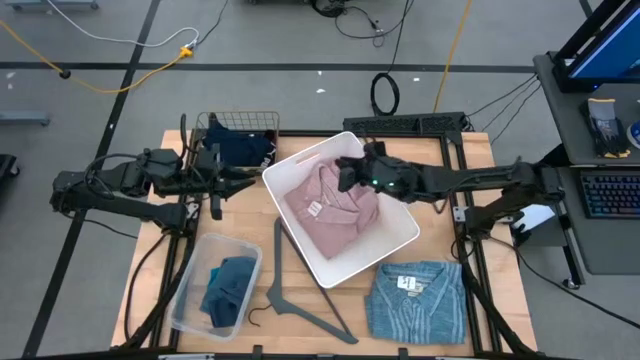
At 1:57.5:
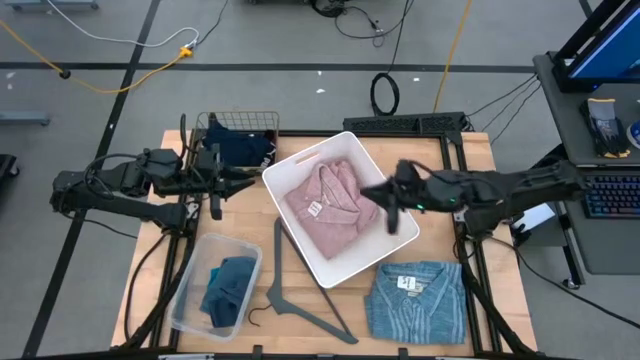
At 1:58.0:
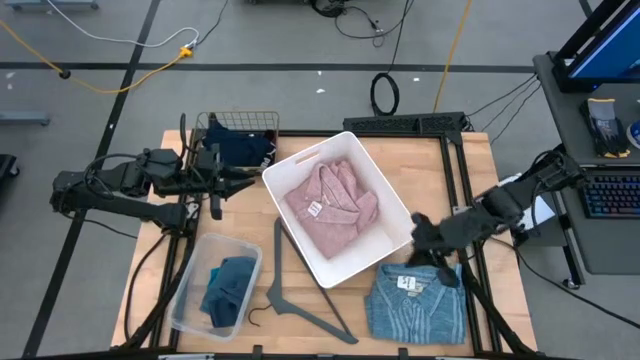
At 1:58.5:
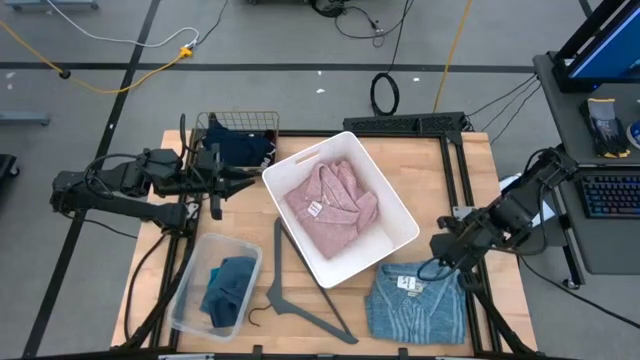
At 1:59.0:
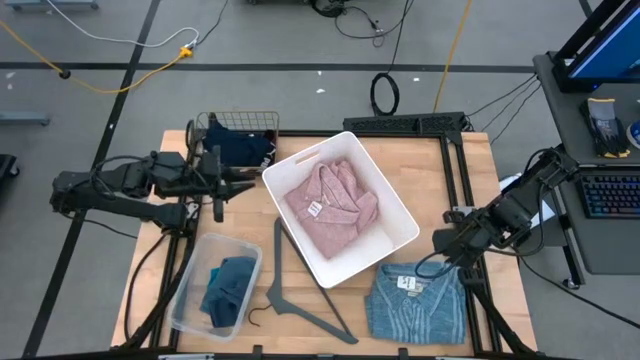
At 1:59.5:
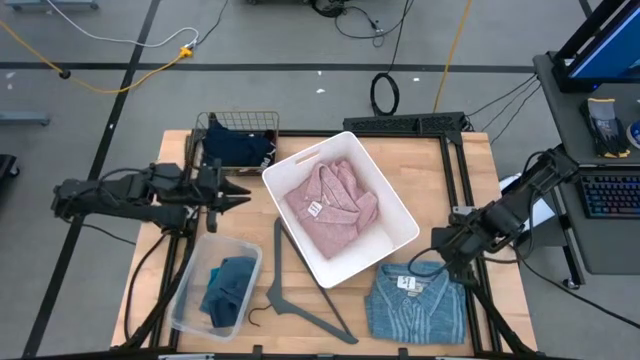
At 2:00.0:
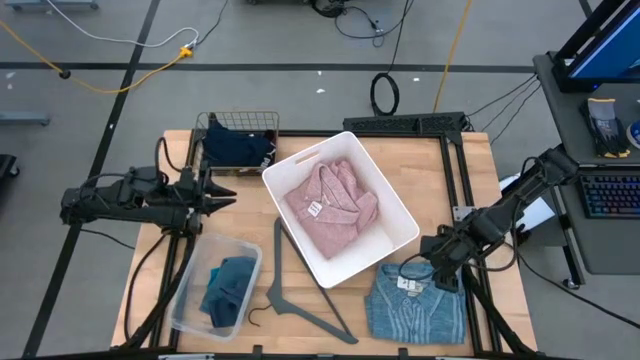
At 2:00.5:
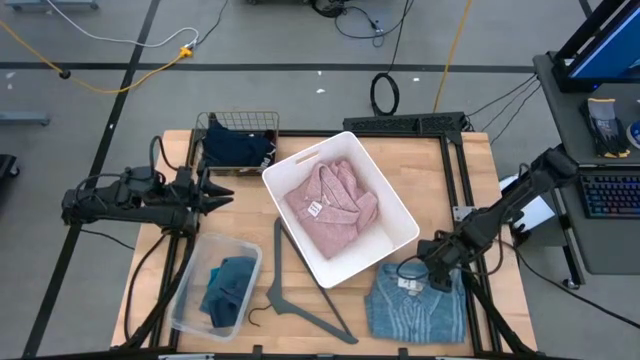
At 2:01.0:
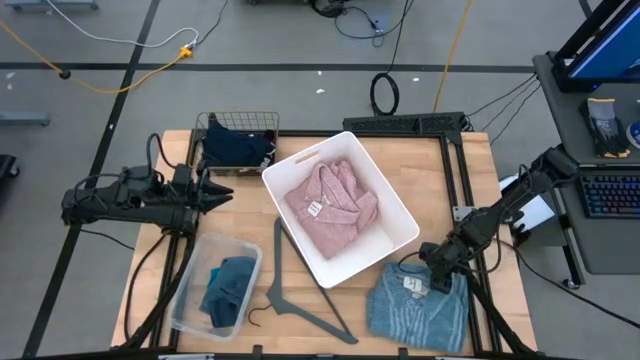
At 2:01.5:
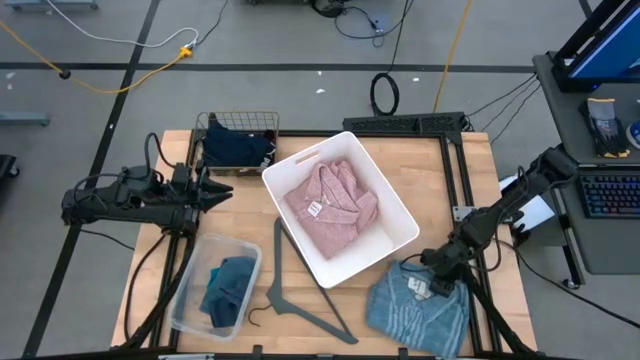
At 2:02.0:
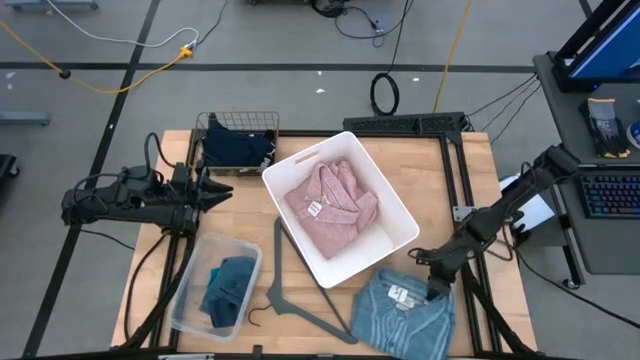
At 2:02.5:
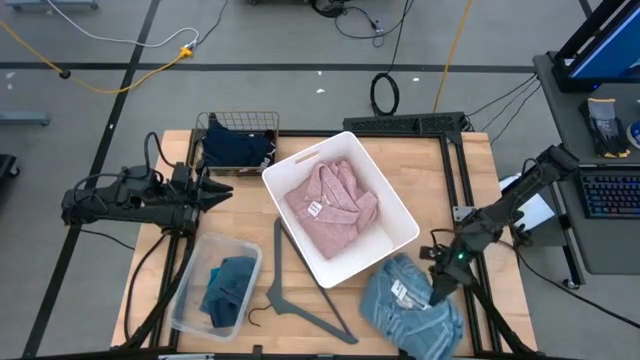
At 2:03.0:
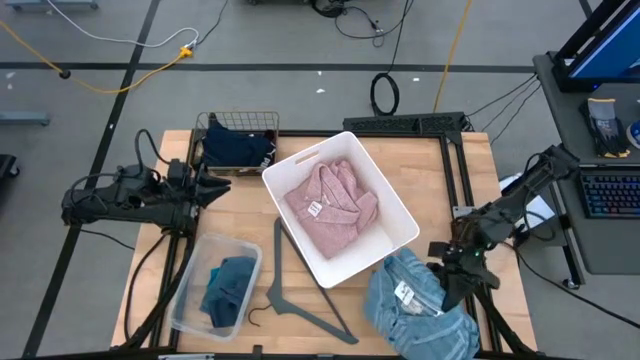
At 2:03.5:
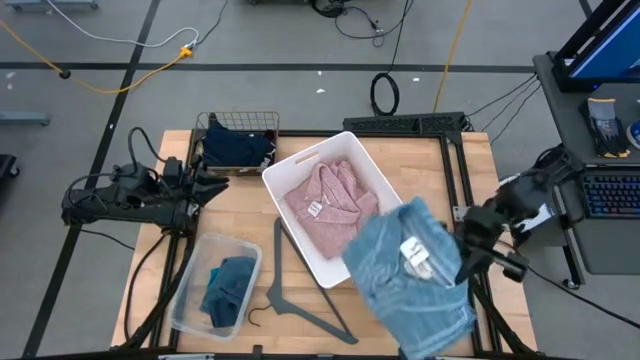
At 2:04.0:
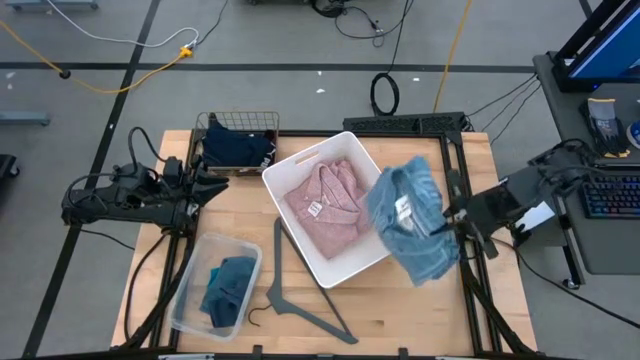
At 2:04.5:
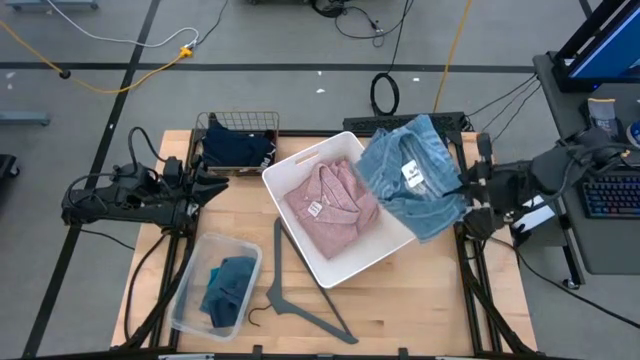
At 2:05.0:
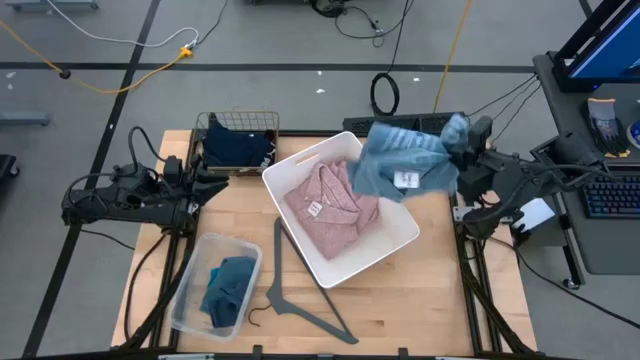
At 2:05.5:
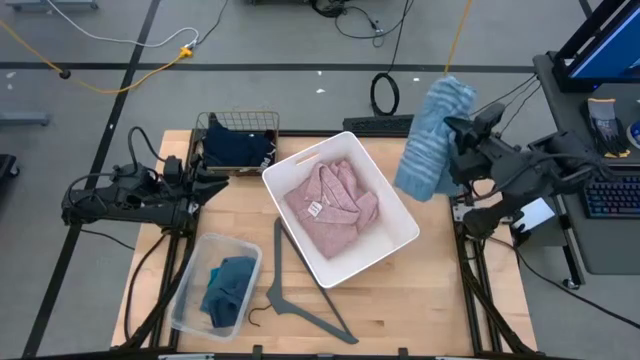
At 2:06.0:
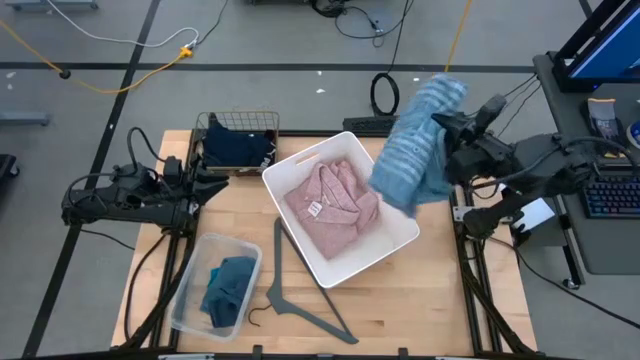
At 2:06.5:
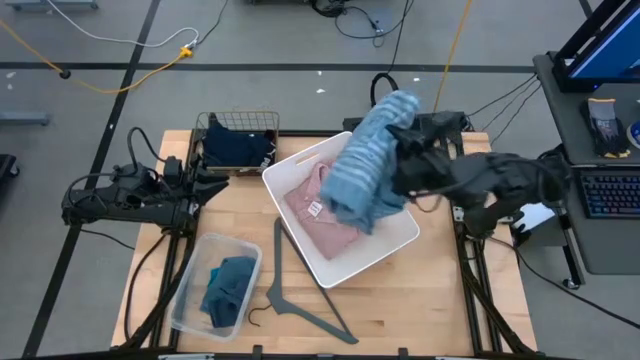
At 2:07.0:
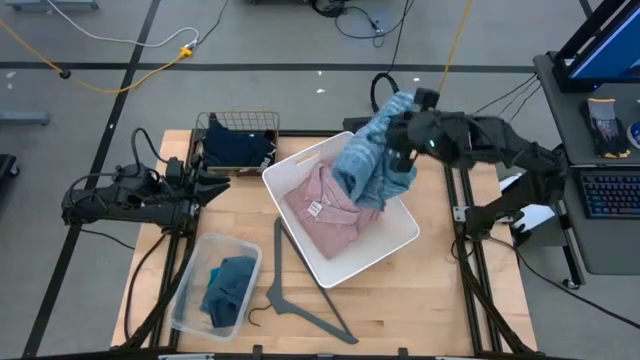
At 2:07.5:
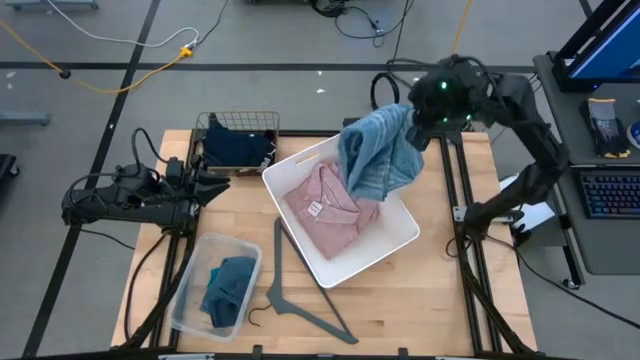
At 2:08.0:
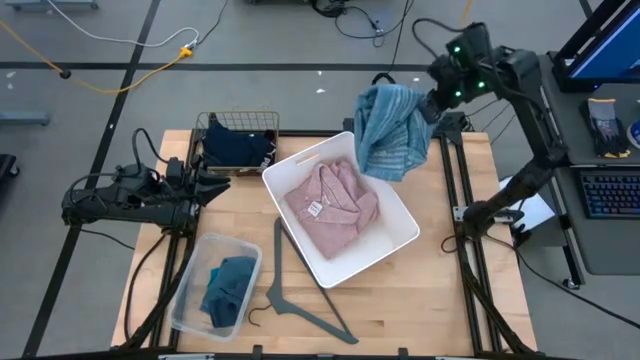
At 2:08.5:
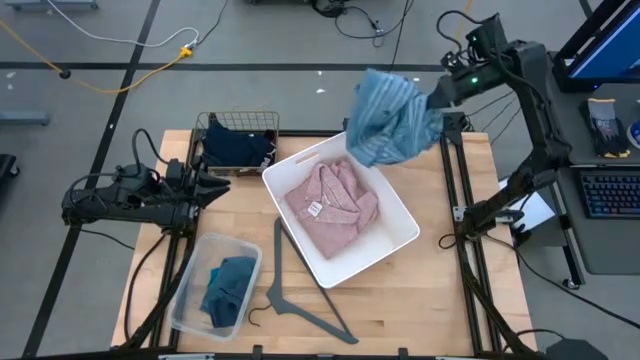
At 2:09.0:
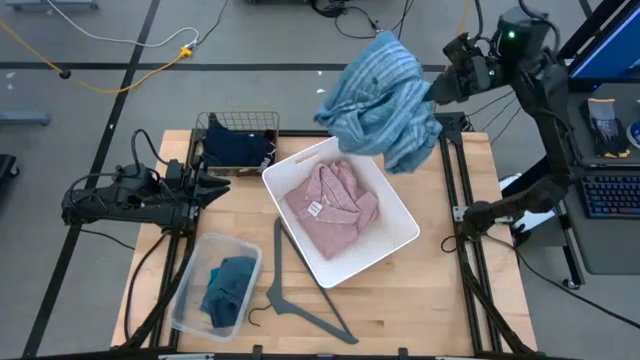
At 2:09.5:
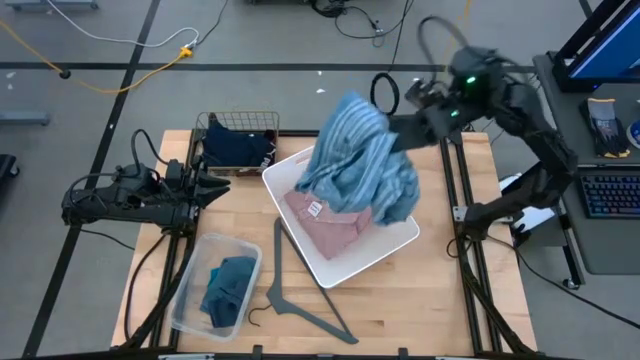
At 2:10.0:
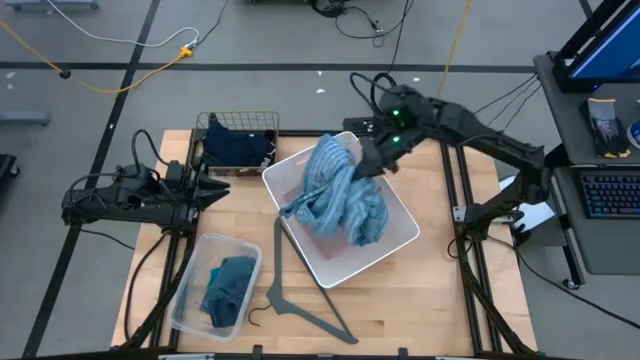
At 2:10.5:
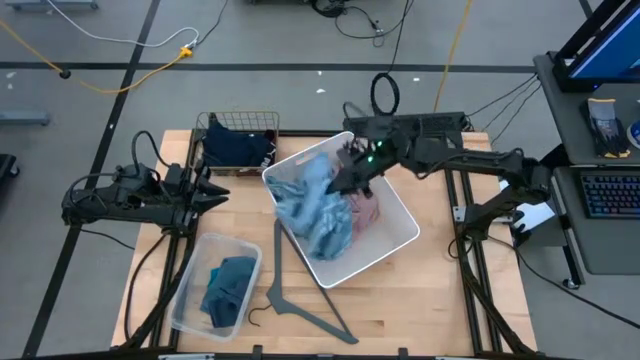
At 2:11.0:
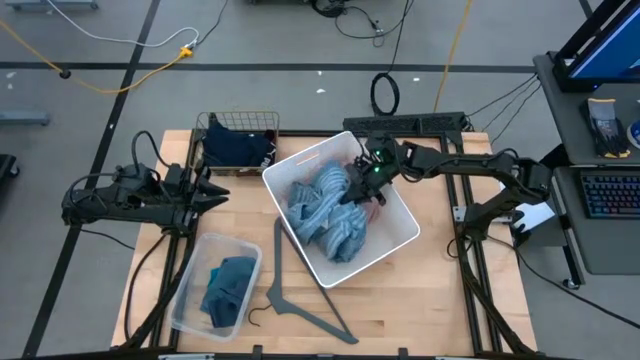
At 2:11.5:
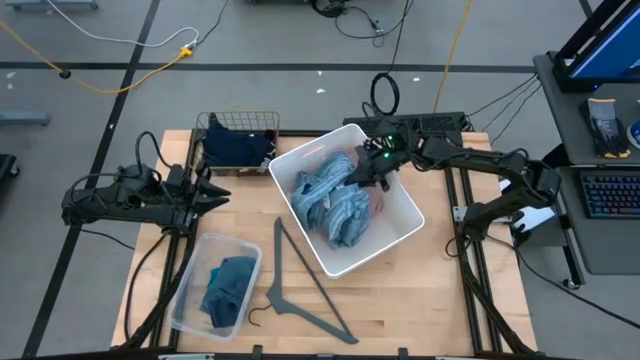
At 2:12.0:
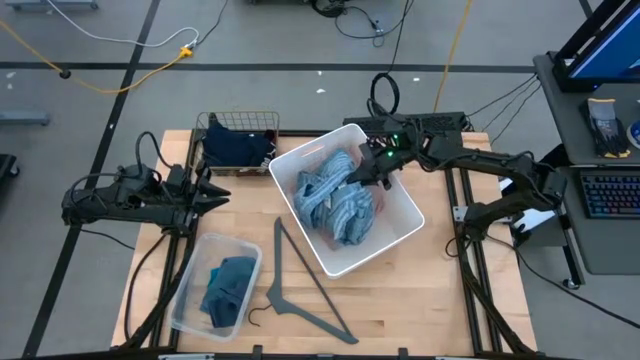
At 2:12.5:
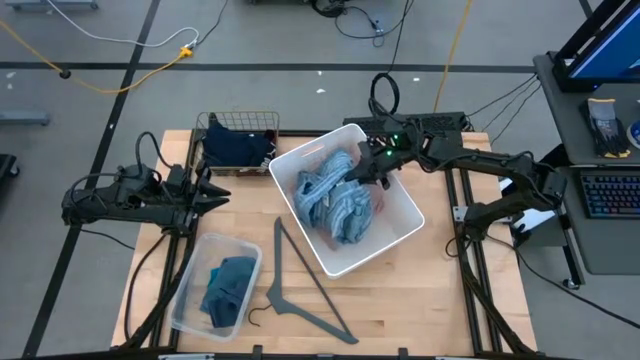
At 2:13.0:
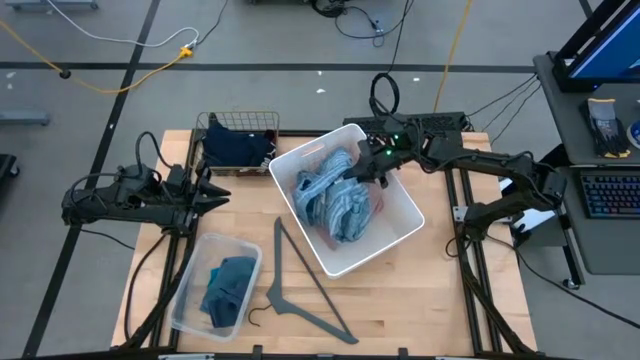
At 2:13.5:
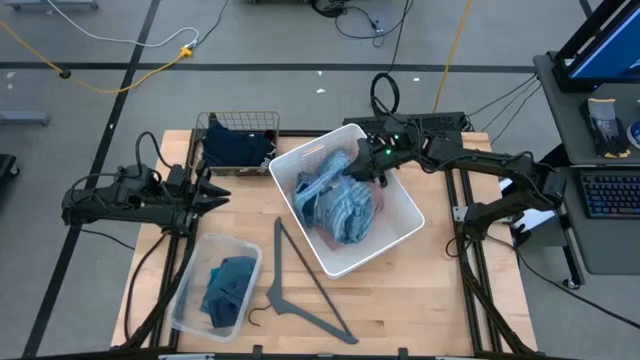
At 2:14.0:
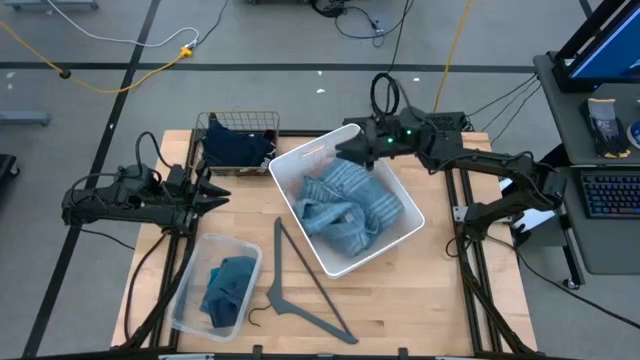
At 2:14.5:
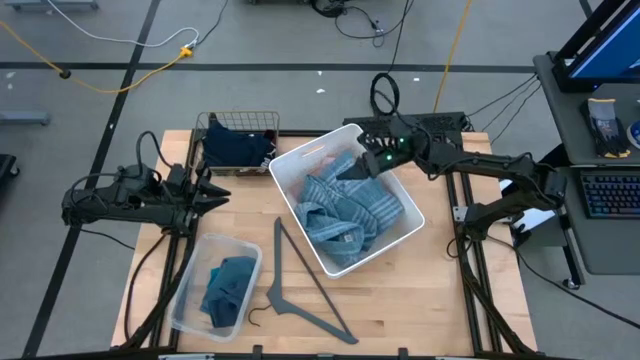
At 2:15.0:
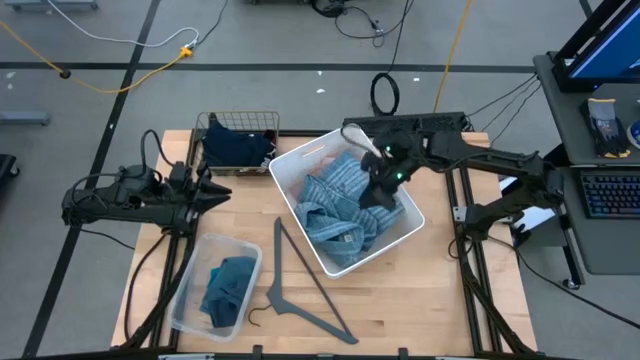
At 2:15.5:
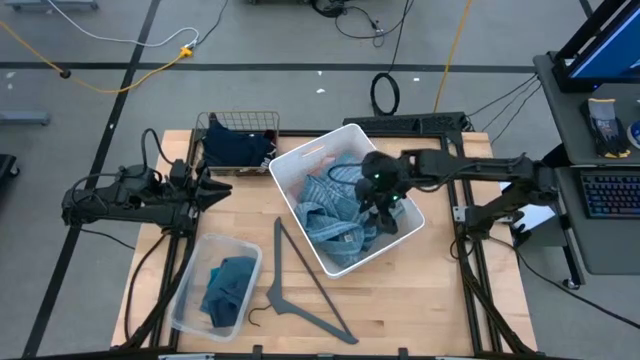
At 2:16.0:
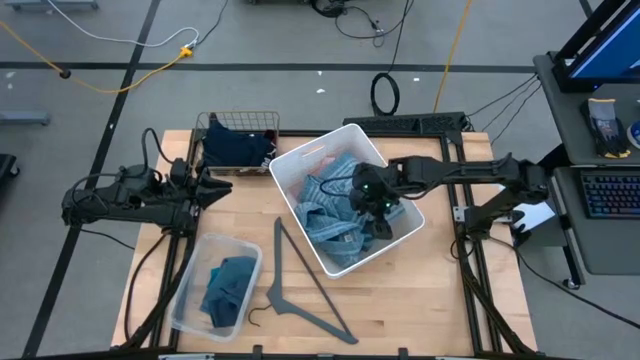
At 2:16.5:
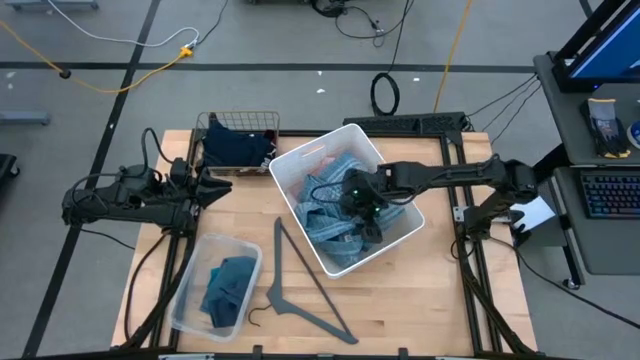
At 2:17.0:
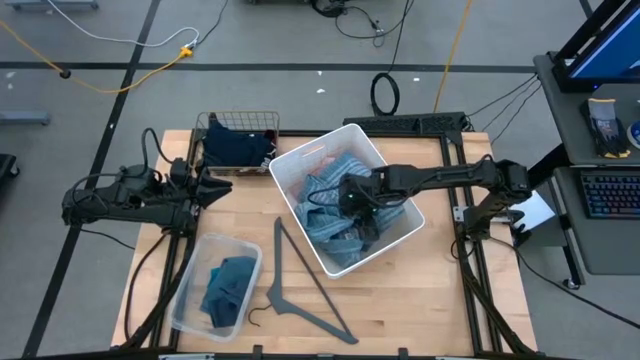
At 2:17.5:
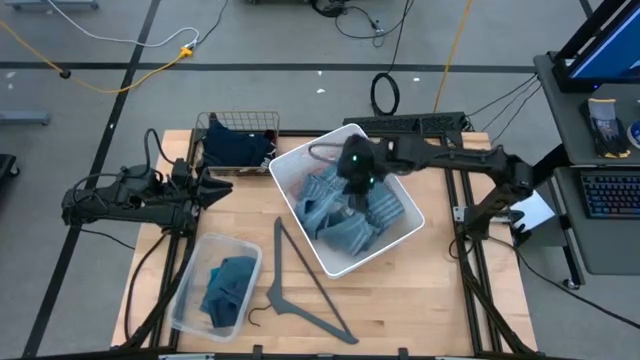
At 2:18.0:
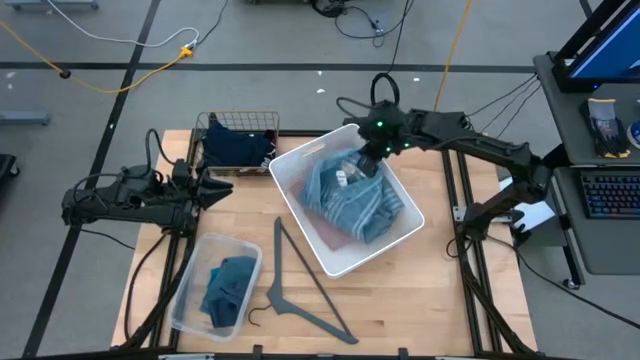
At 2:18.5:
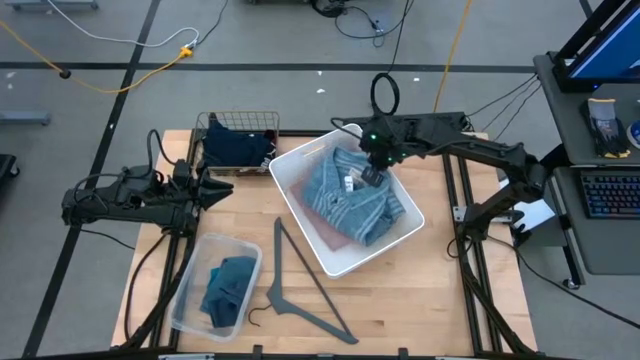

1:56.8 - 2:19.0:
Task: Pick & Place Cloths
Put the blue polo into the white bin
